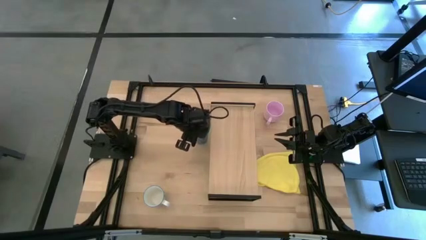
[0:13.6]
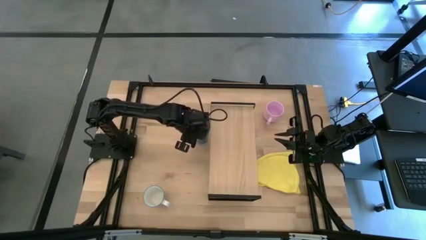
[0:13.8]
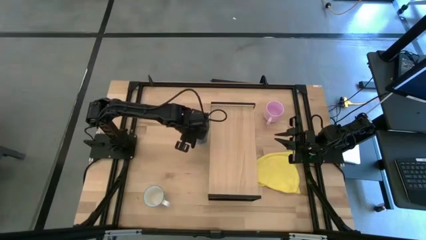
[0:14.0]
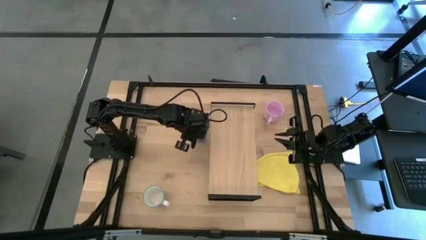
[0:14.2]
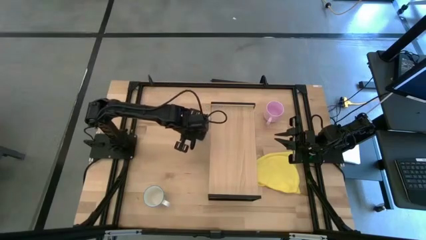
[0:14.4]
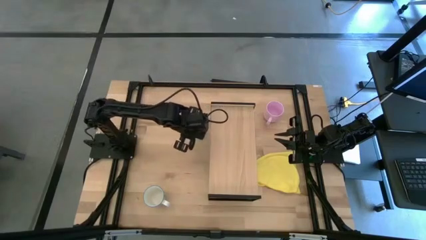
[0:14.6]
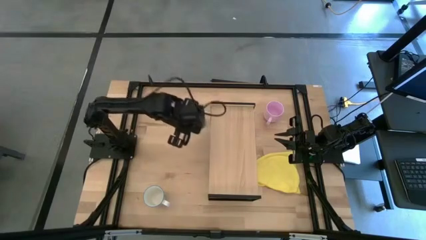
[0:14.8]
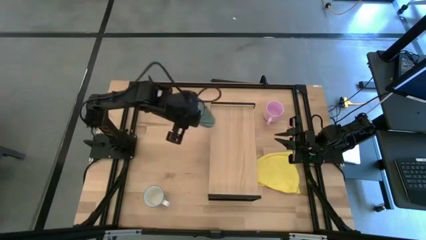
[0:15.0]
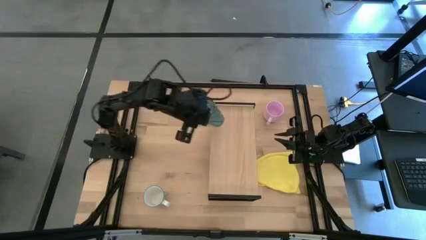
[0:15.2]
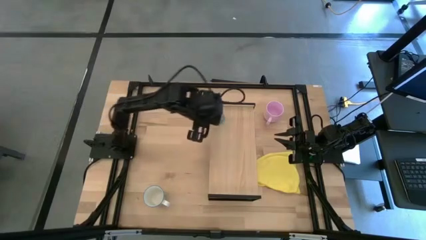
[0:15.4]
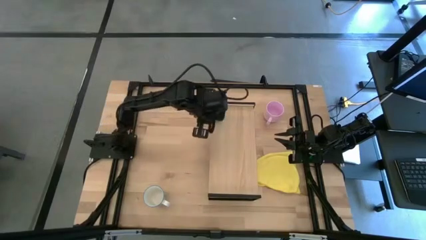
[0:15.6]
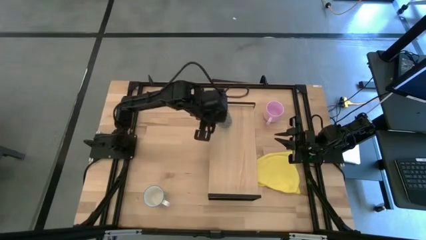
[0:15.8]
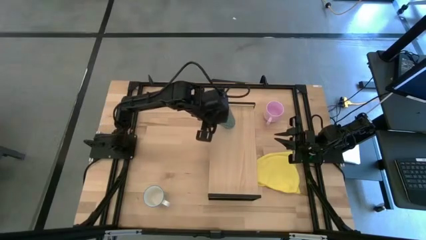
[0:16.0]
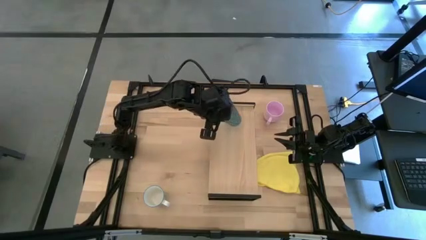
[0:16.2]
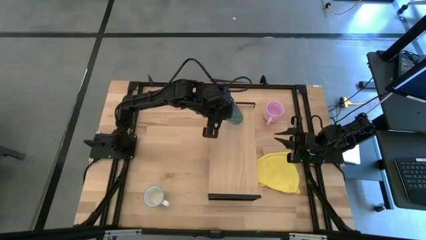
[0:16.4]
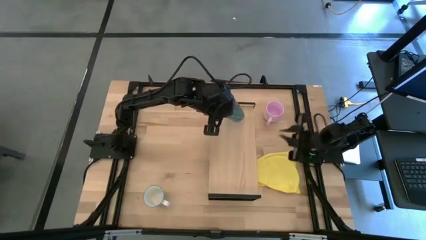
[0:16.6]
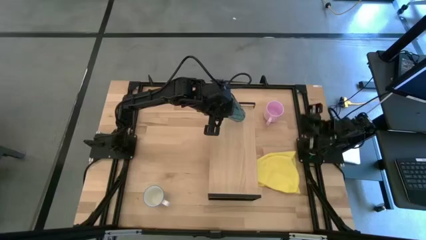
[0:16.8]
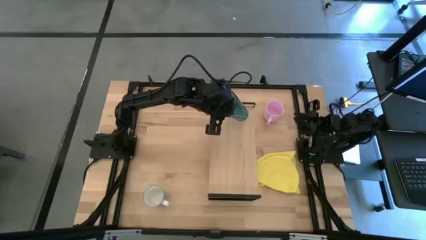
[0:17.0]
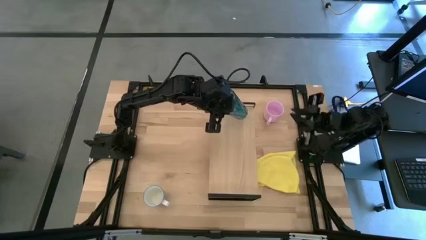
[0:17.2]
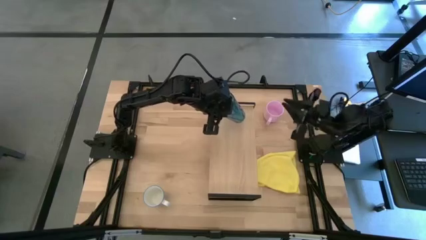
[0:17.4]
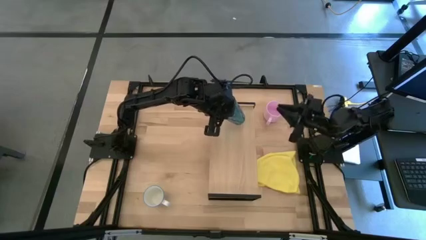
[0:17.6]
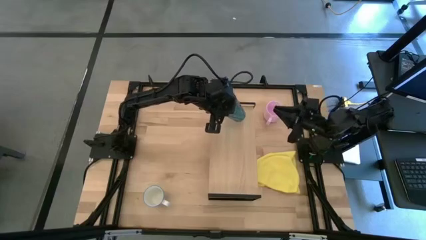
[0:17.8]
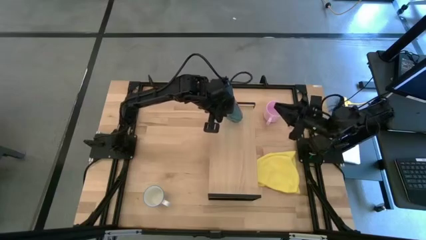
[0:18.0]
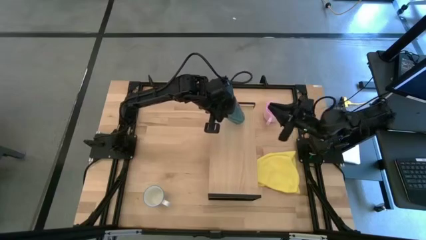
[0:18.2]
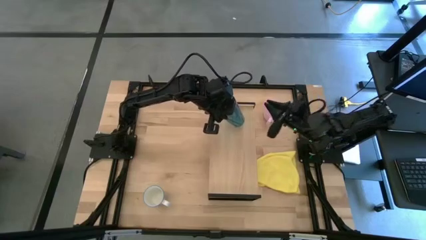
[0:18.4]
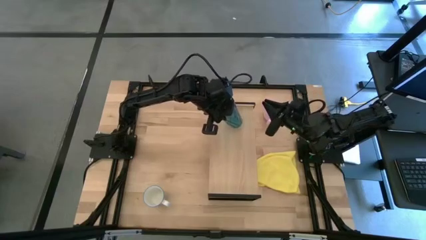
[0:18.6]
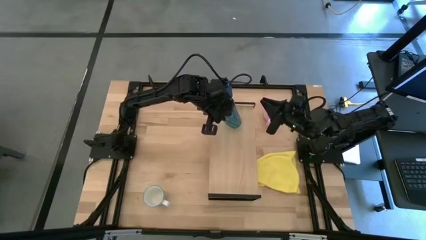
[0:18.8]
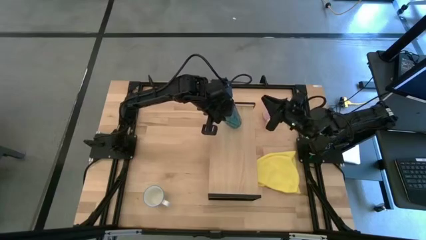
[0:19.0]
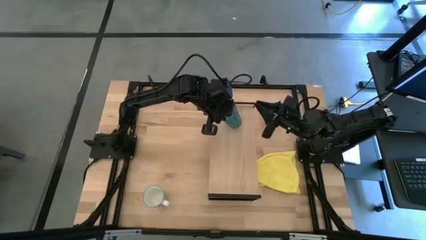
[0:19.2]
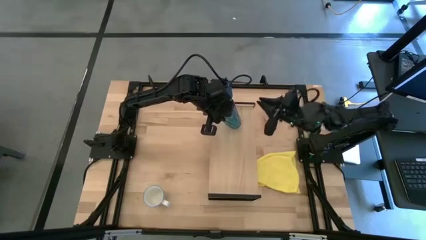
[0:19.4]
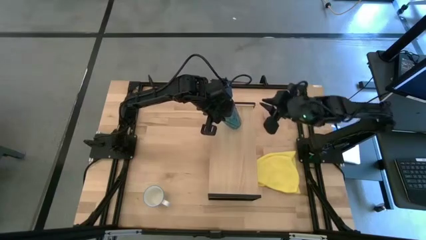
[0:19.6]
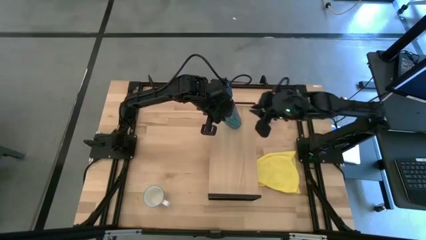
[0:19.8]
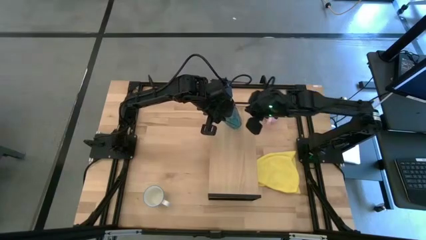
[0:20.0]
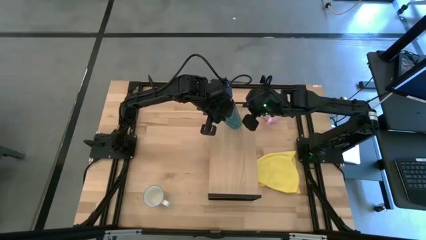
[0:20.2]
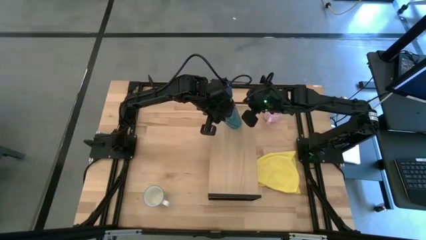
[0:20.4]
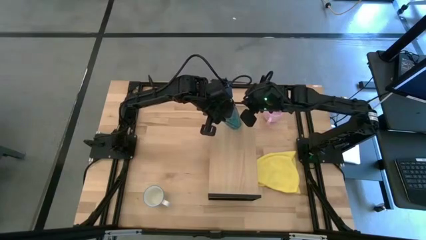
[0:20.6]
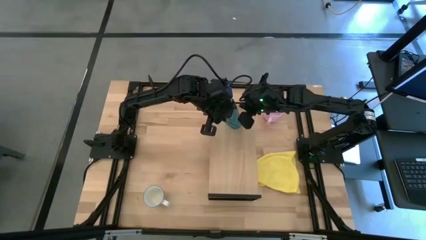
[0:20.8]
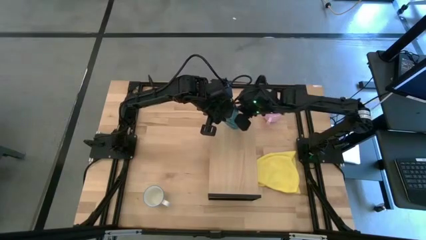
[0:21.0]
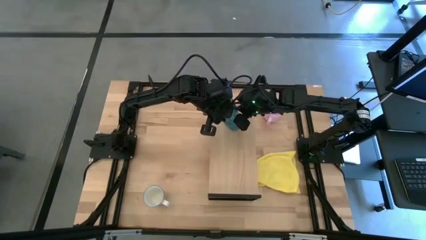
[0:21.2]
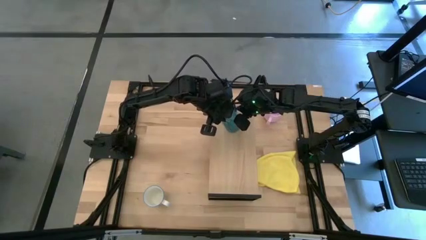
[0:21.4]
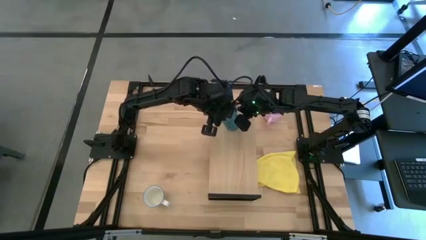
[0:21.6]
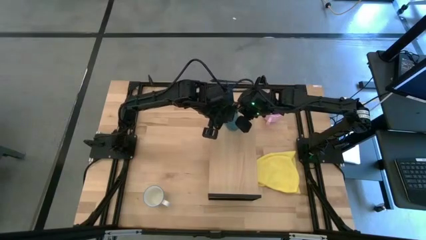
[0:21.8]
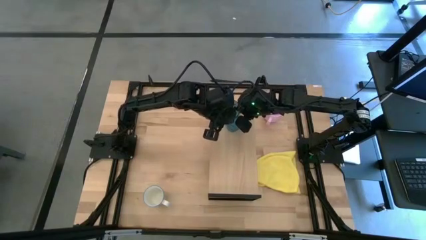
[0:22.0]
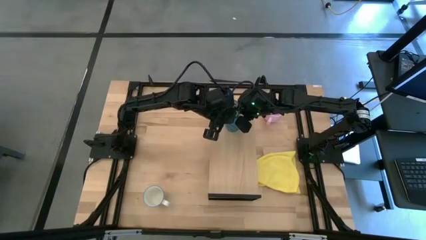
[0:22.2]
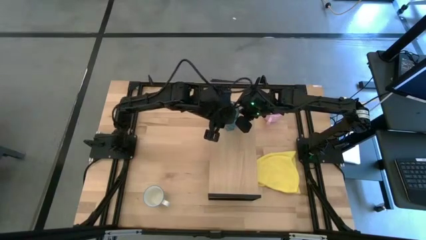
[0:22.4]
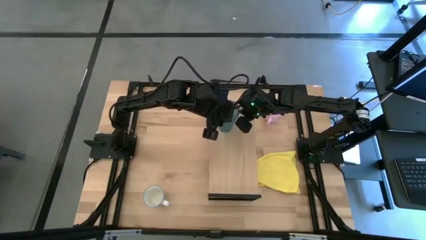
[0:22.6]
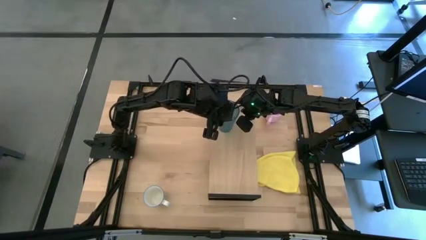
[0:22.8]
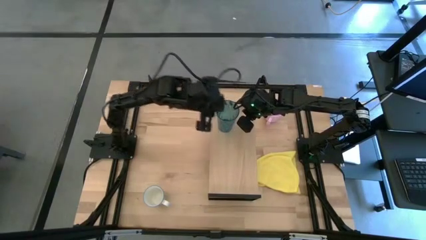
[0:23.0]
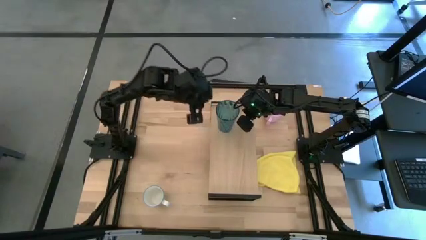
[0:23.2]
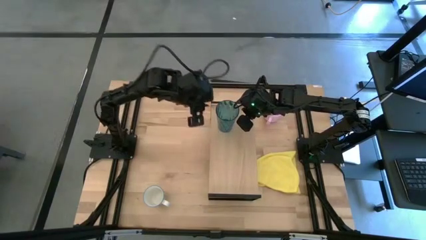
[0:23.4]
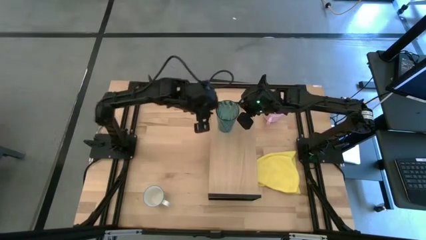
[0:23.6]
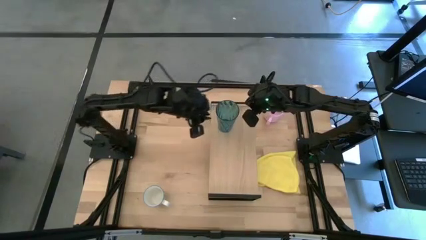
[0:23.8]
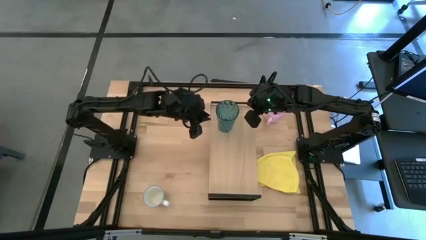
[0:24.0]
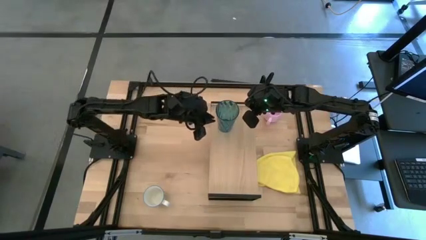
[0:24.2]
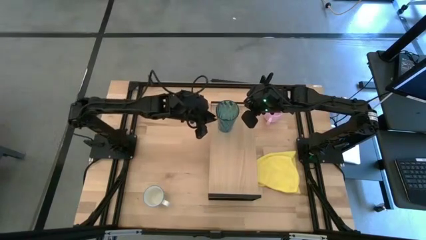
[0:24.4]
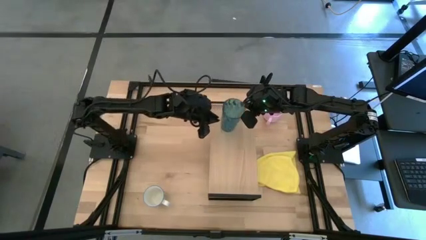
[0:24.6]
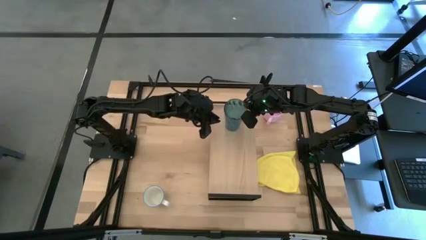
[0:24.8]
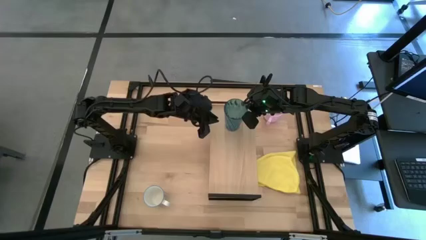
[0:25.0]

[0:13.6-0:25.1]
Task: Stack small to large cups/mugs on shelf
Put the blue cup on the shelf
